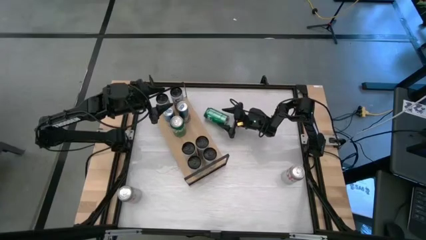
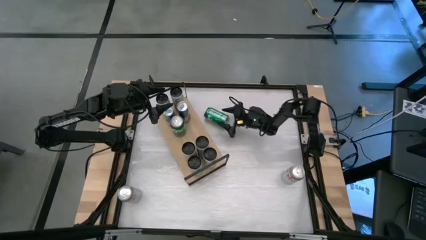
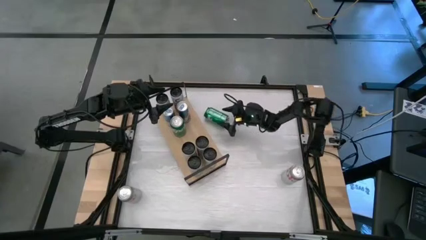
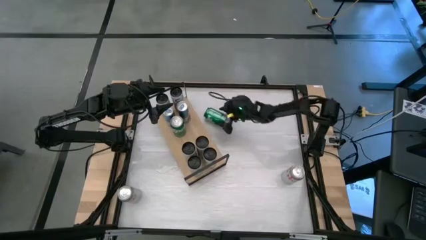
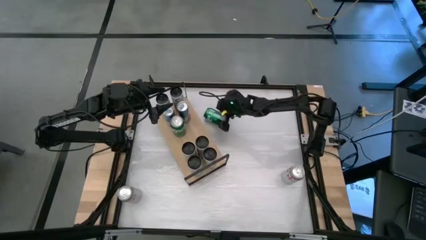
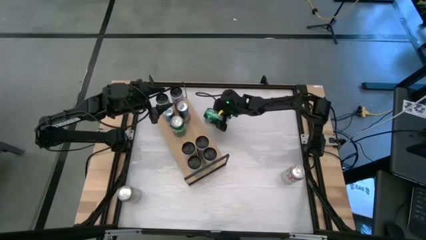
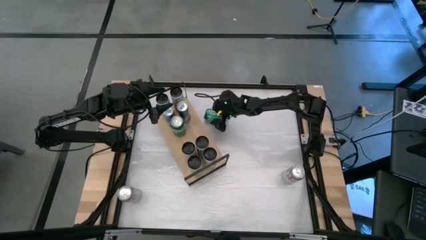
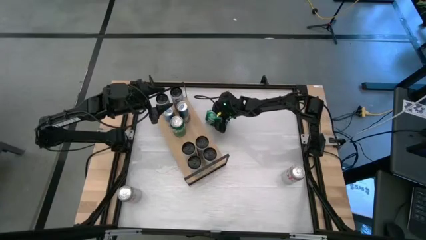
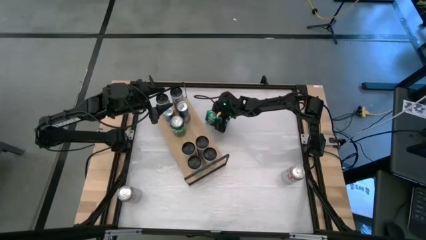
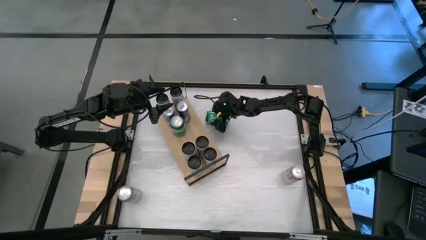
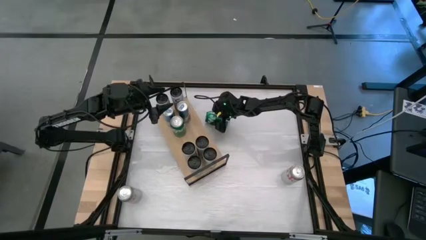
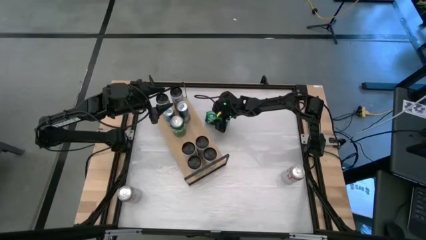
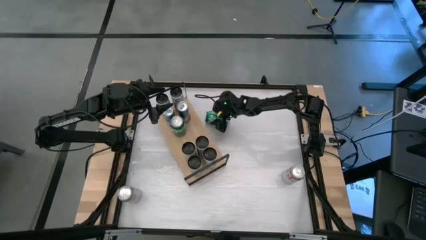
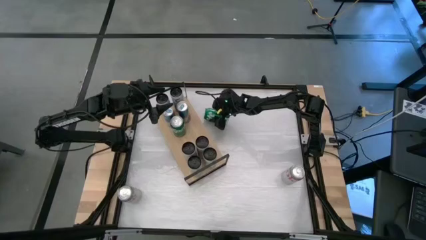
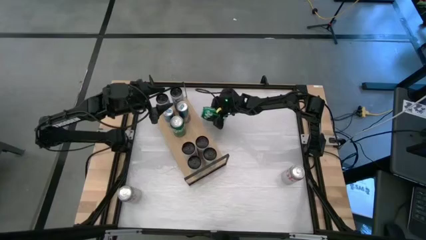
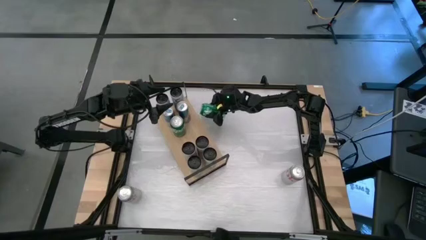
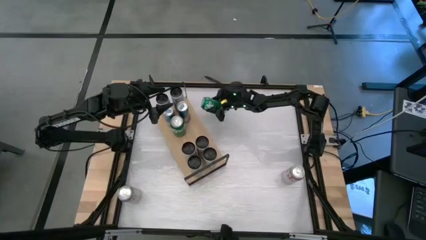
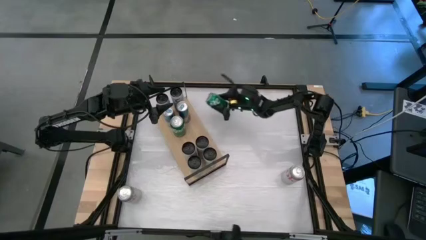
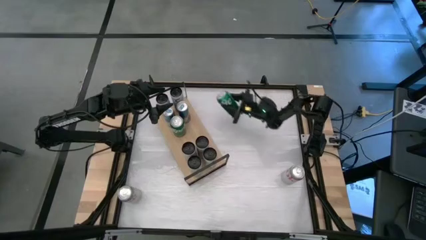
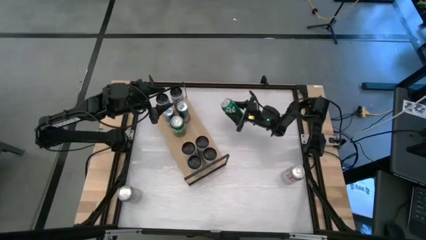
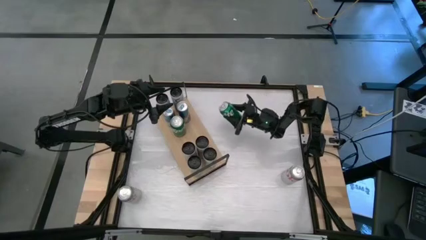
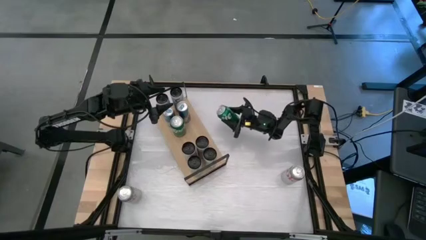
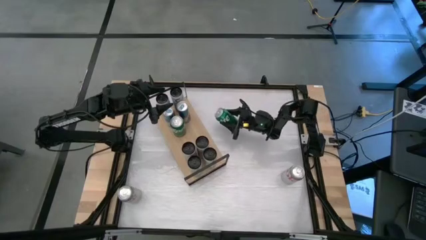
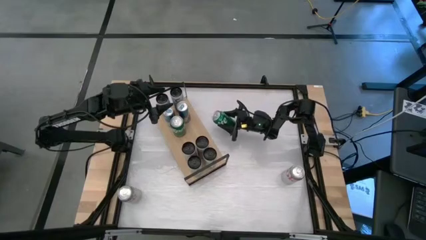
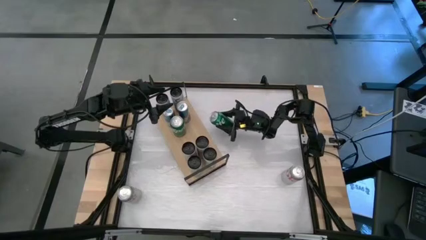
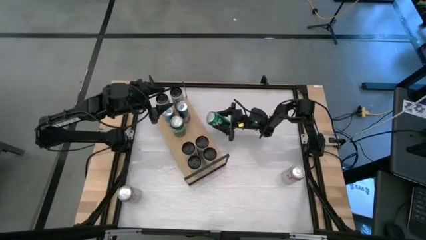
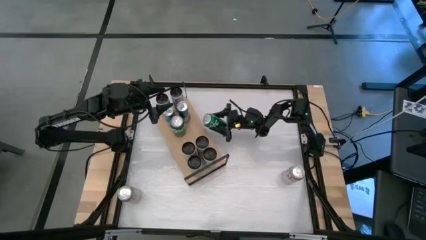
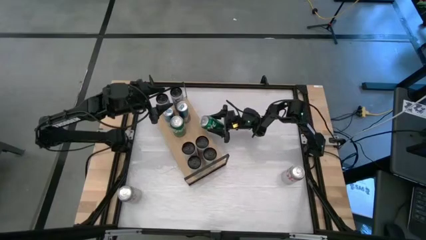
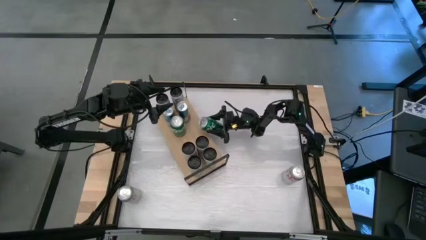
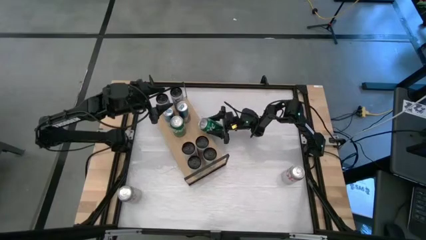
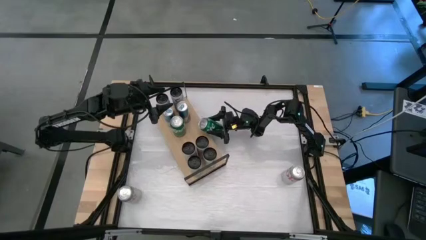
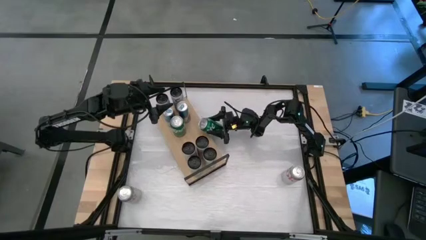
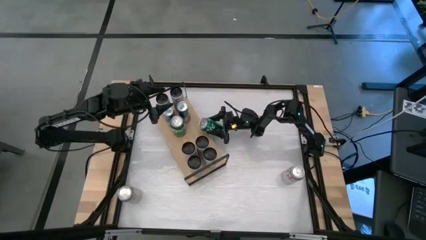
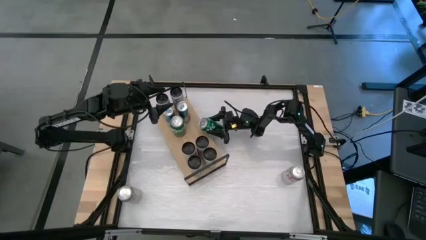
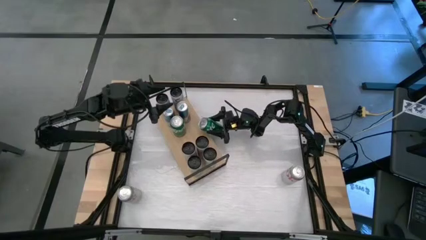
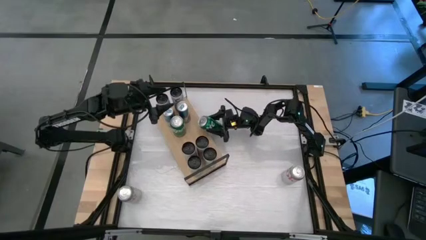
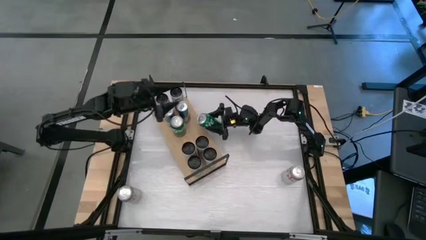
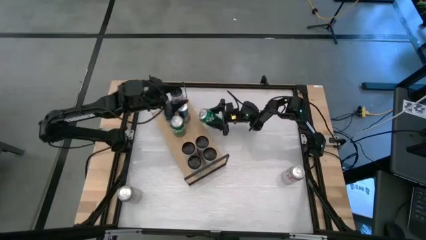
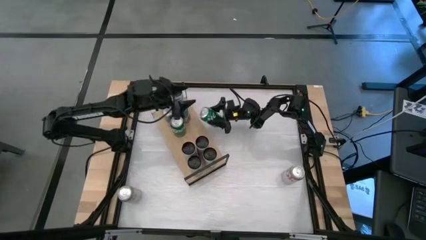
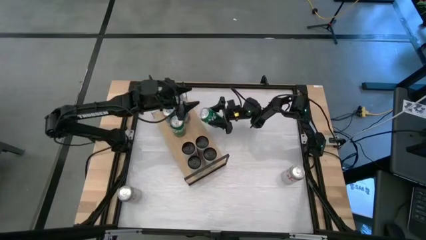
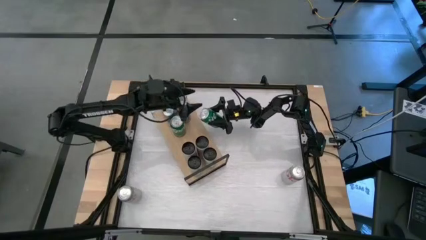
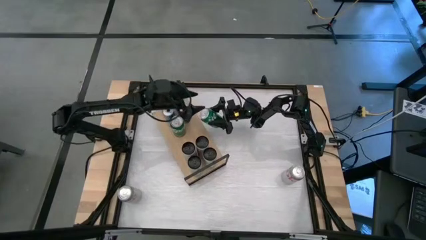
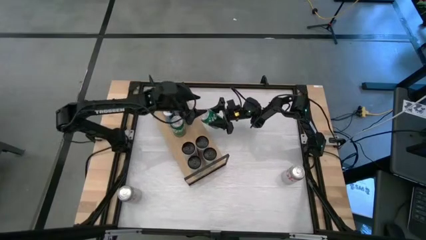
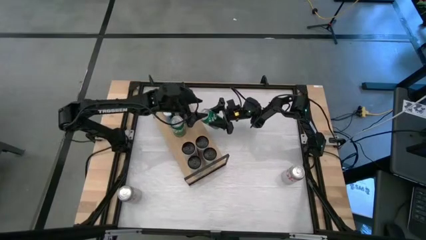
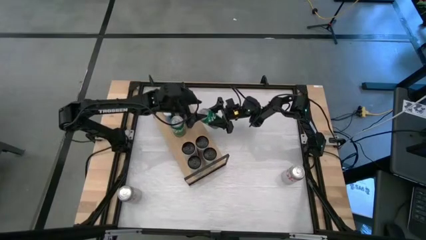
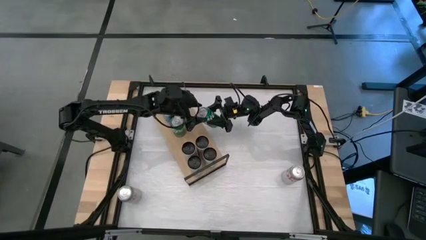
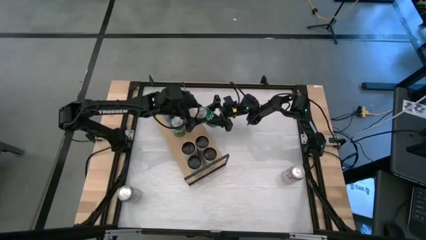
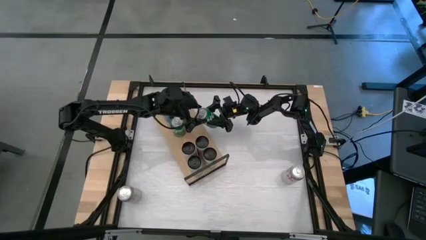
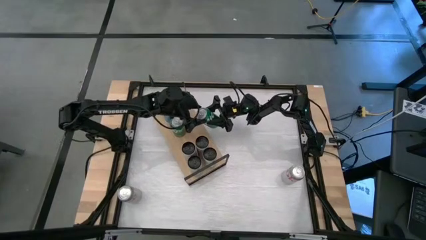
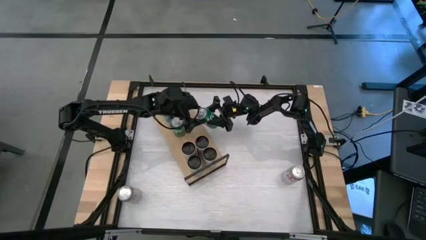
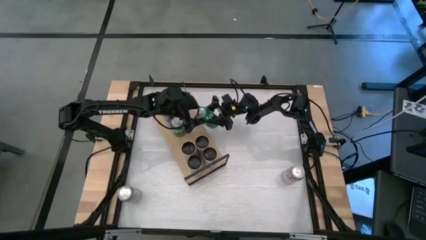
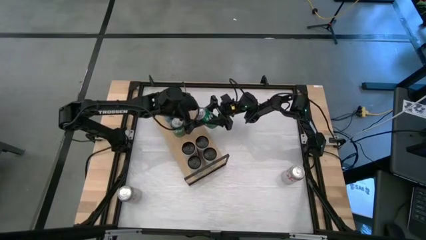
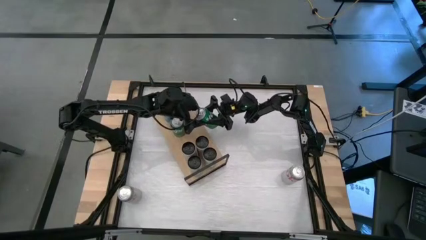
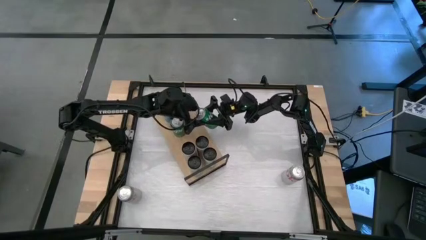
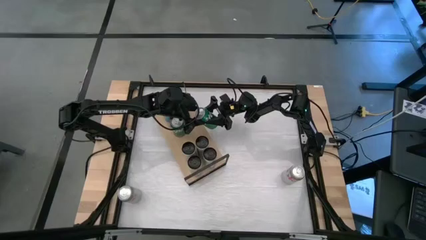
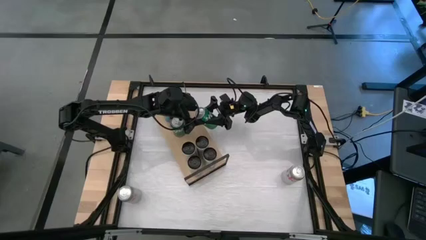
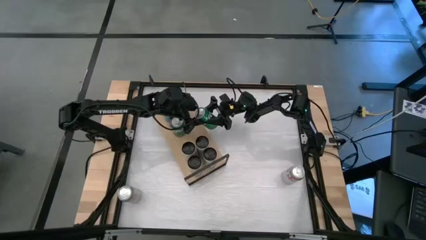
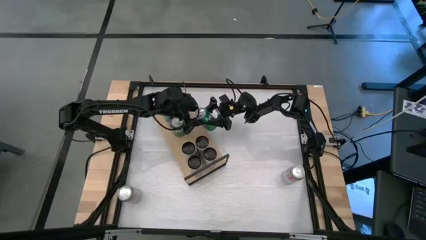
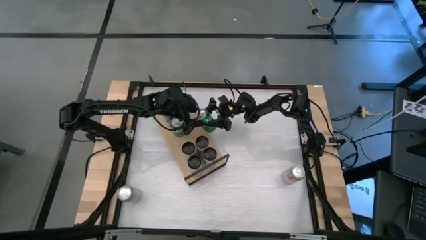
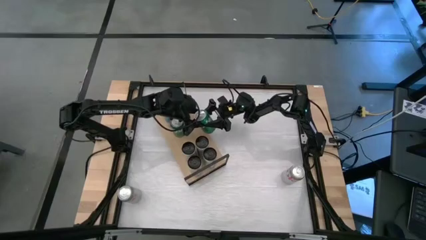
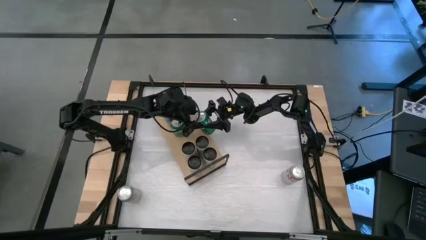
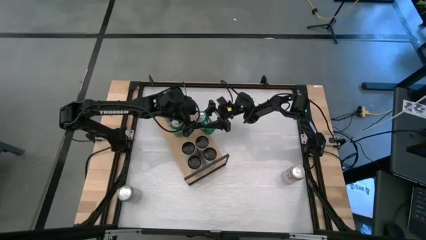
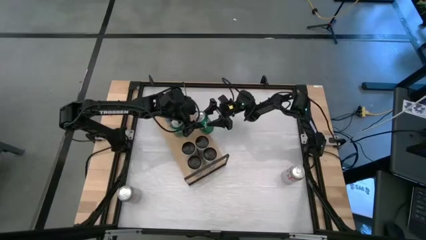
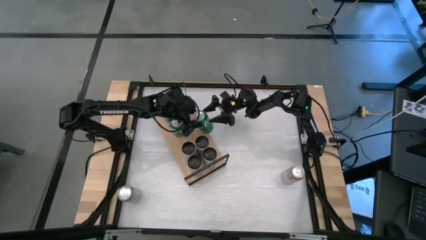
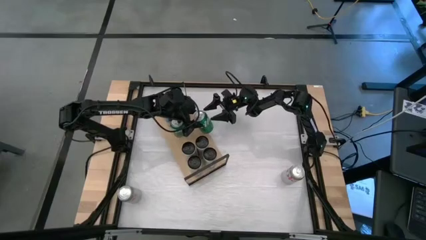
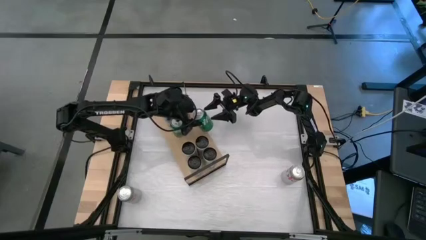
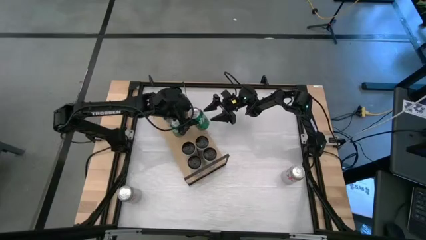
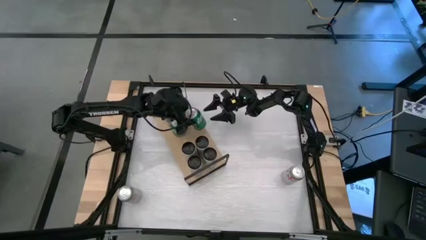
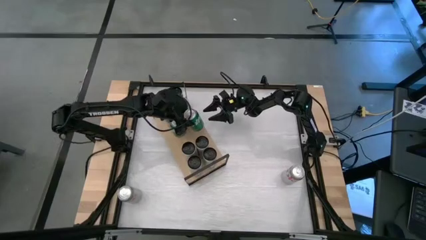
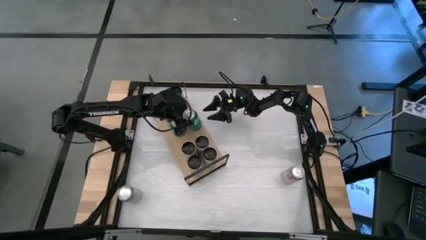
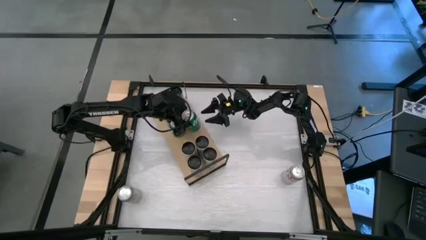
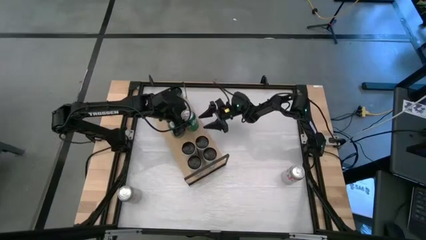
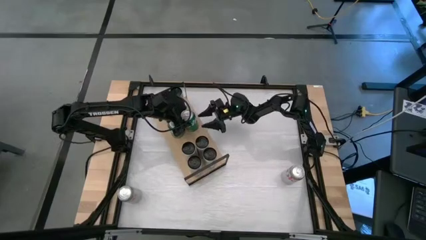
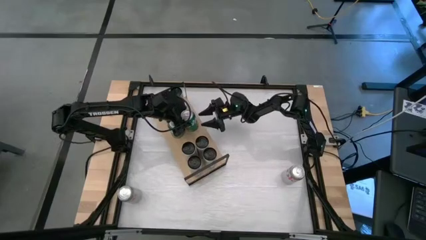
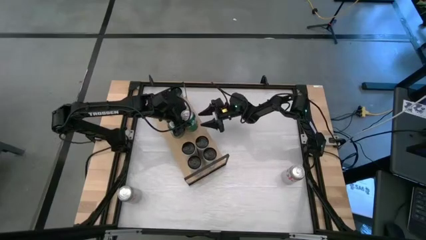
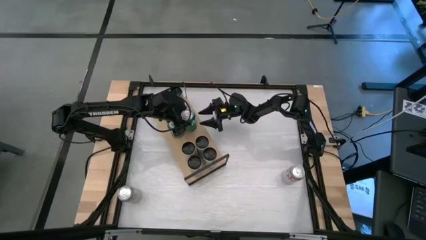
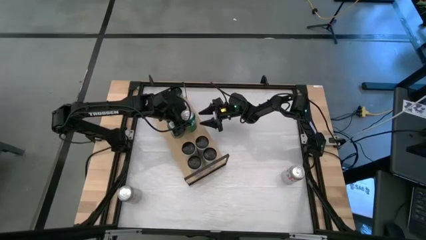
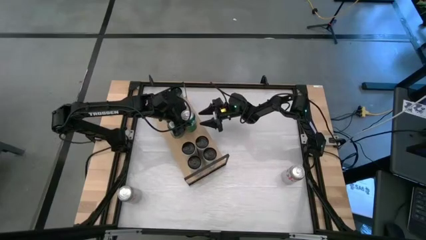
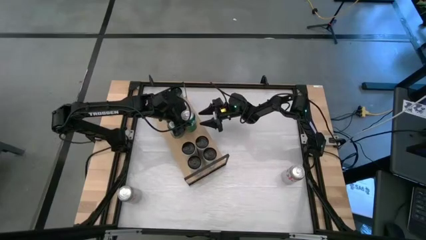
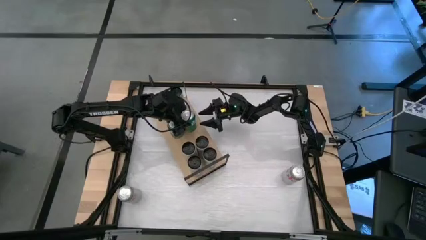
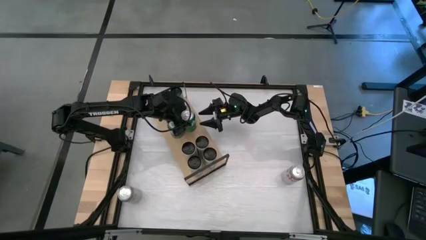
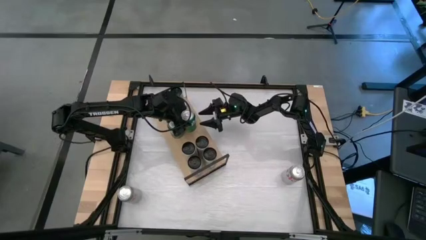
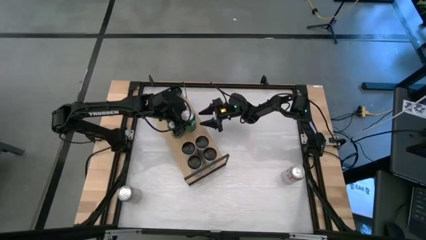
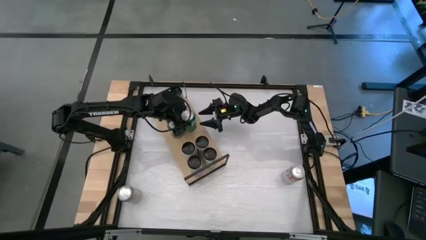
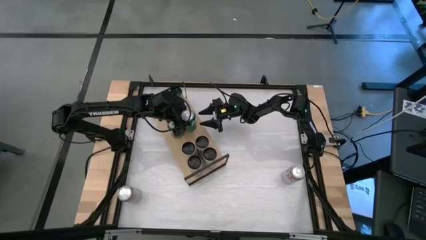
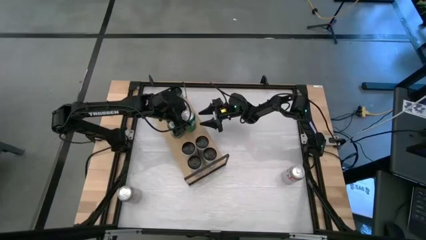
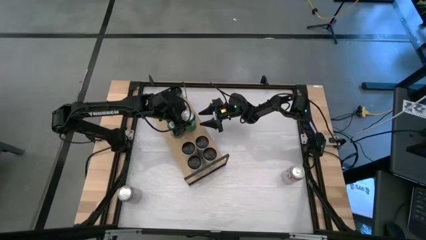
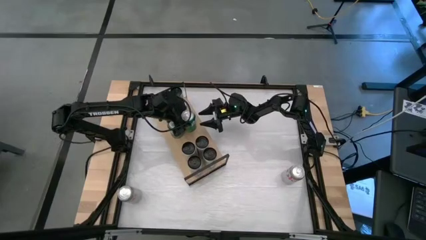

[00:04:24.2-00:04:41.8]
Task: Place canned beverage on shelf
Put the green soda can on the shelf aligned with the other green soda can
